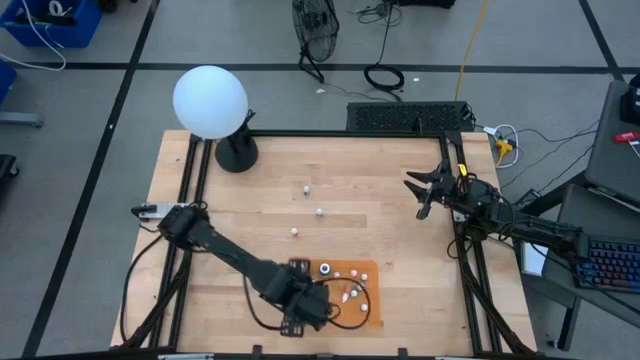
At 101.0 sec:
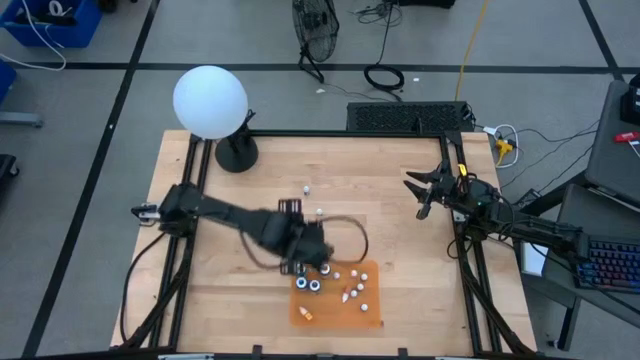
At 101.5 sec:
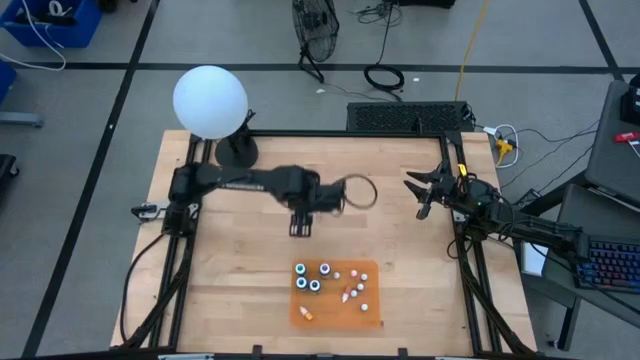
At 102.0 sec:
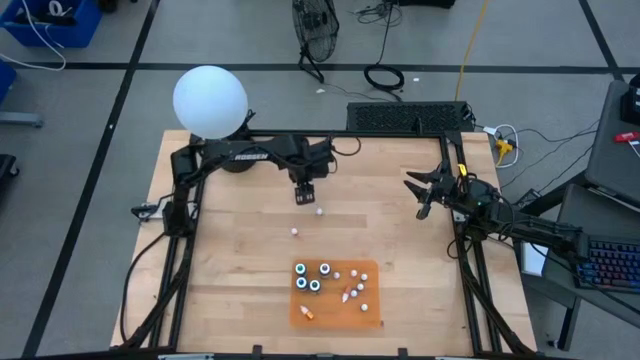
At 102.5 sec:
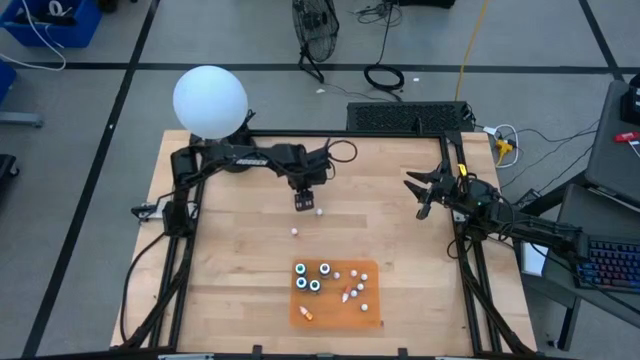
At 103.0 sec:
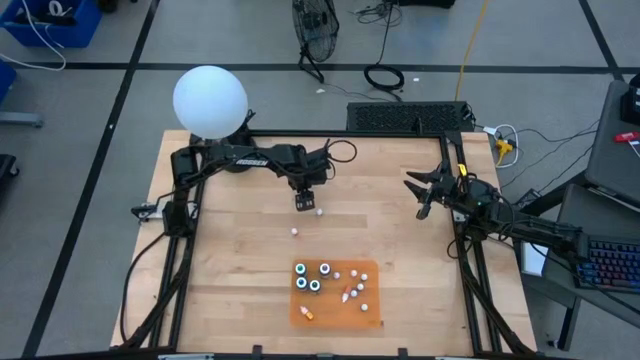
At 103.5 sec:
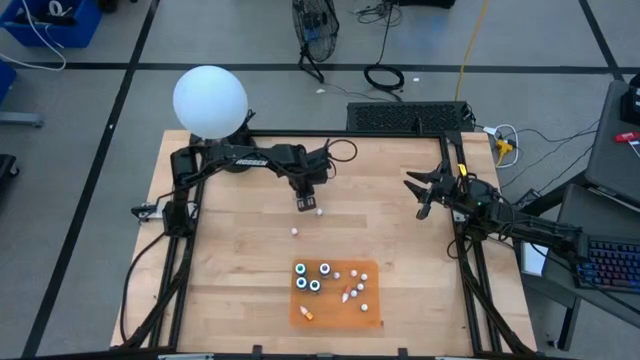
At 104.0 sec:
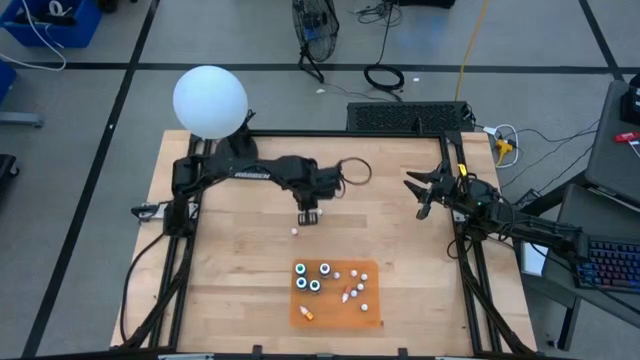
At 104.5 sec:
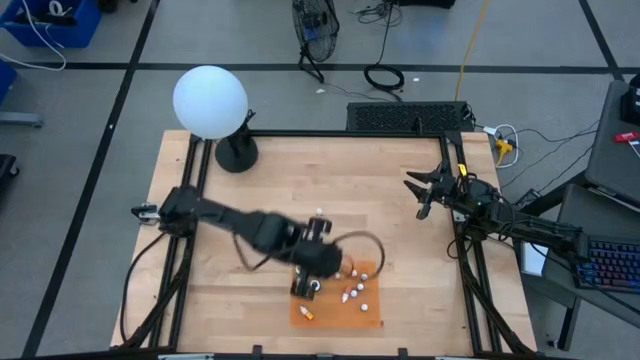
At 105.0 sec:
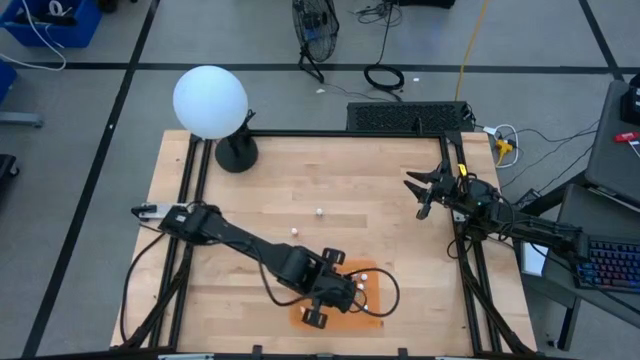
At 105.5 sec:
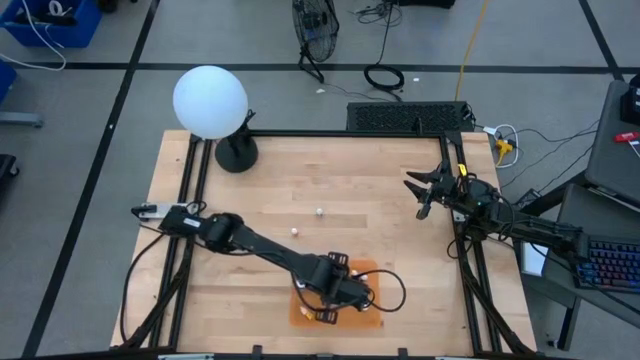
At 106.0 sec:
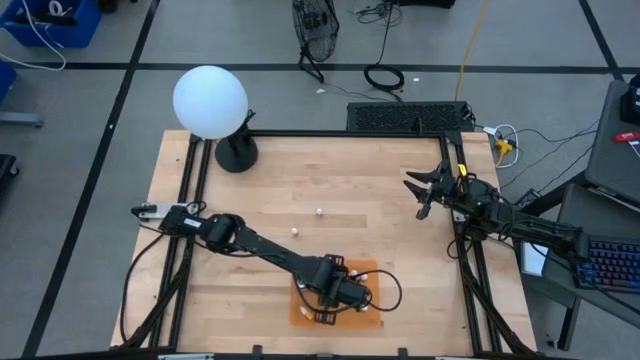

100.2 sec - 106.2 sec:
Task: Pick & Place food coloring
Put the small purple food coloring bottle into the orange container

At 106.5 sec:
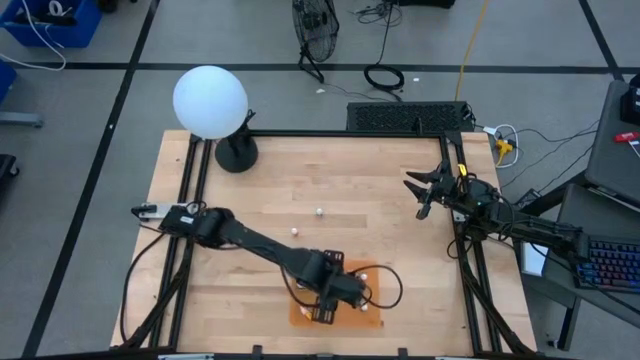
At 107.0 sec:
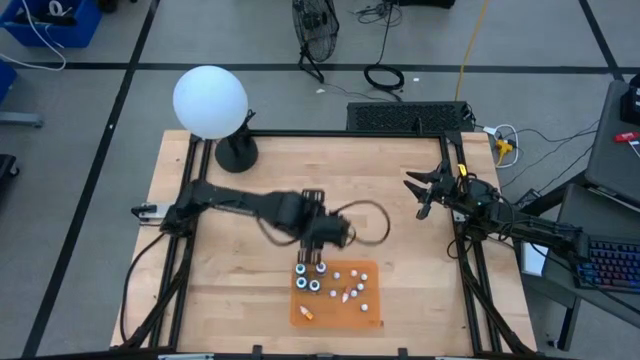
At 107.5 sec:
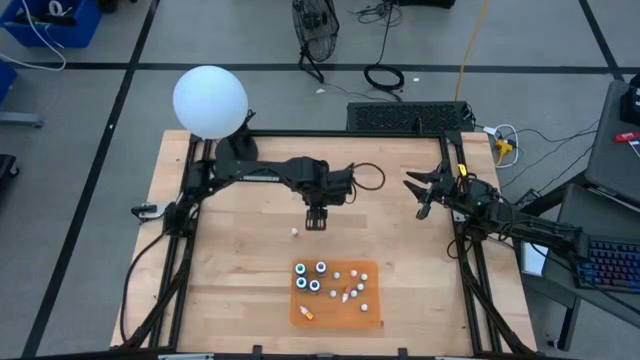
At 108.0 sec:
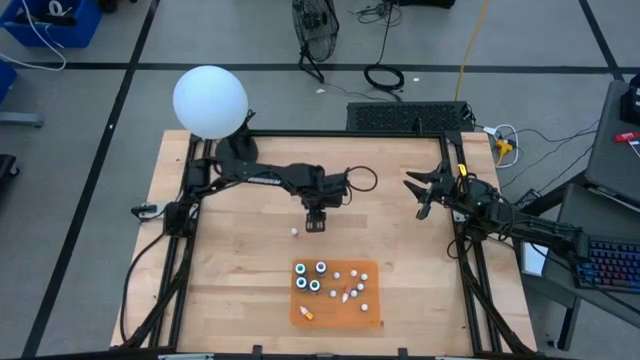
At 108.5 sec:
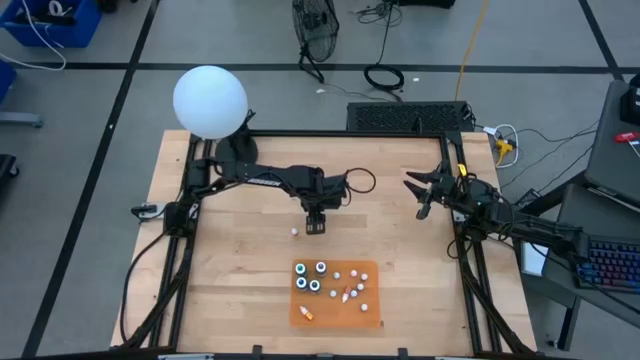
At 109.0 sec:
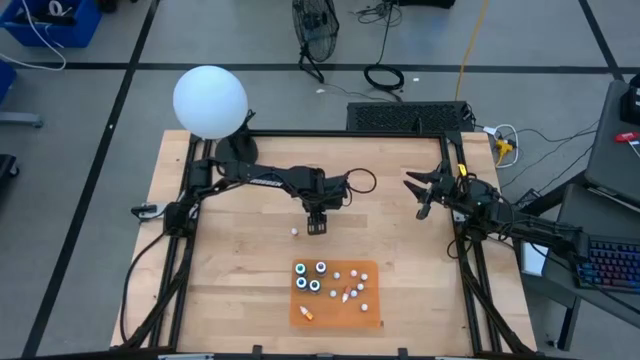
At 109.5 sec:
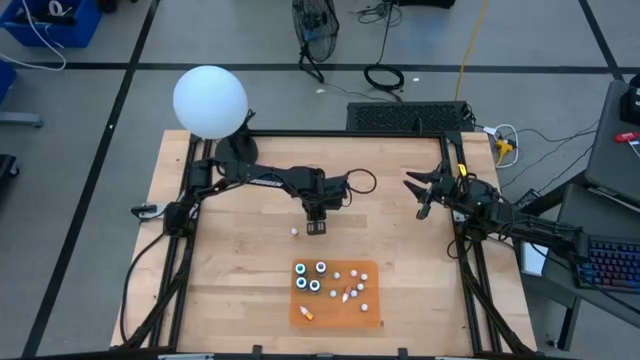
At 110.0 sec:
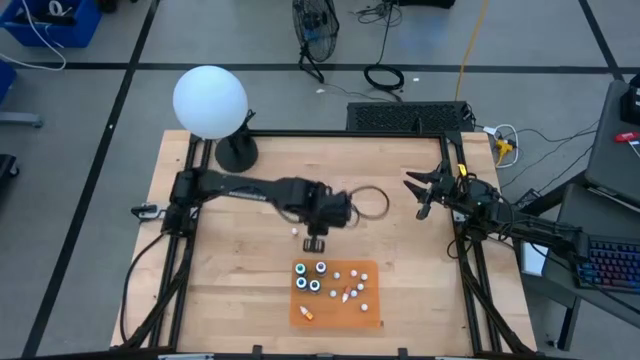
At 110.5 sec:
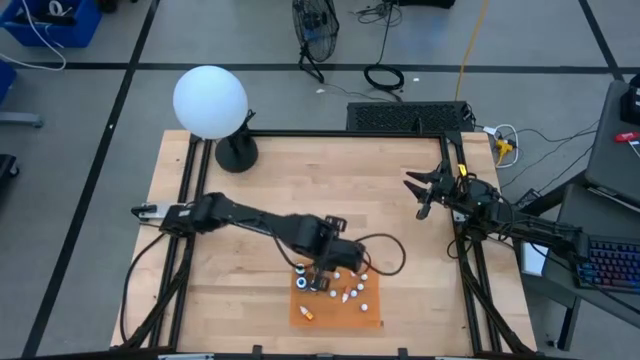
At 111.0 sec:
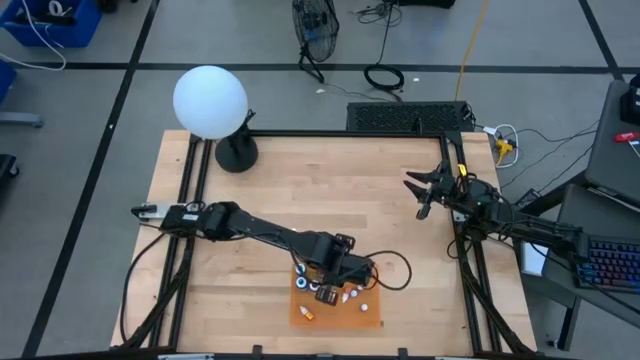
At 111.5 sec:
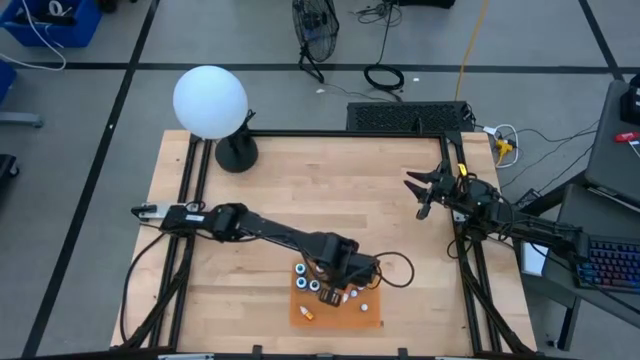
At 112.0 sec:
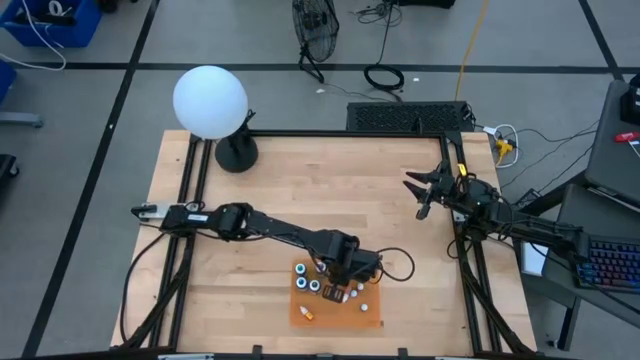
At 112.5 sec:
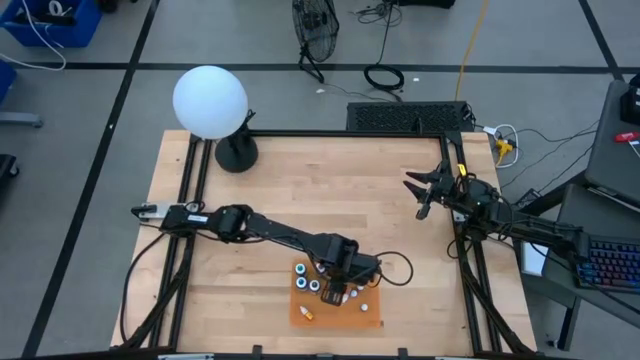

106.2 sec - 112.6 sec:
Put the small purple food coloring bottle into the orange container

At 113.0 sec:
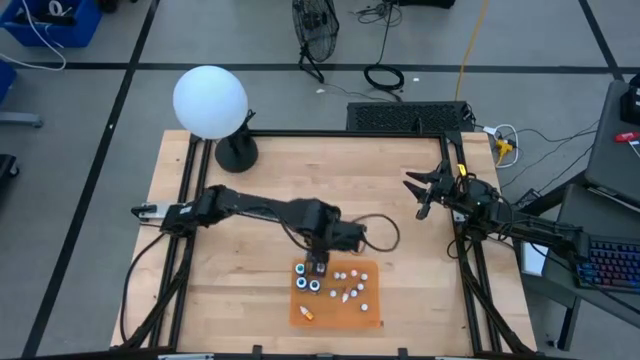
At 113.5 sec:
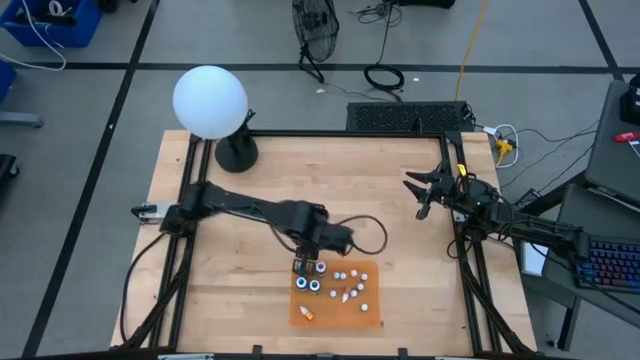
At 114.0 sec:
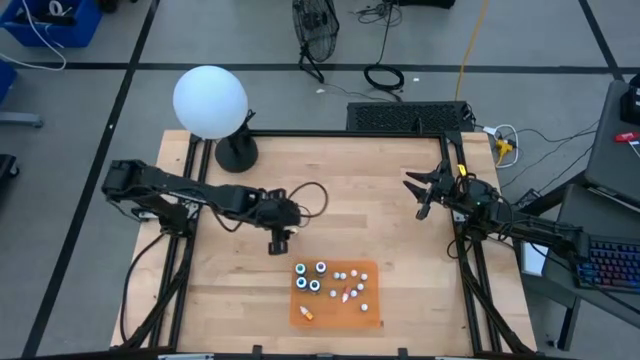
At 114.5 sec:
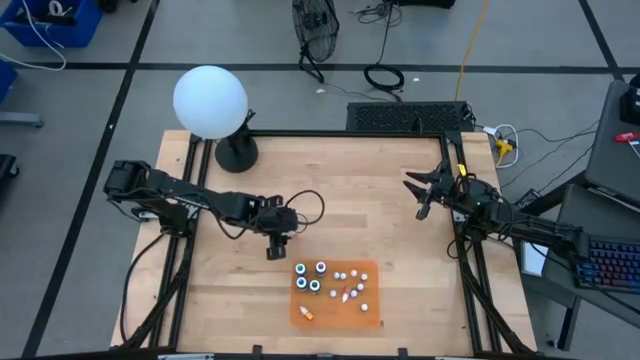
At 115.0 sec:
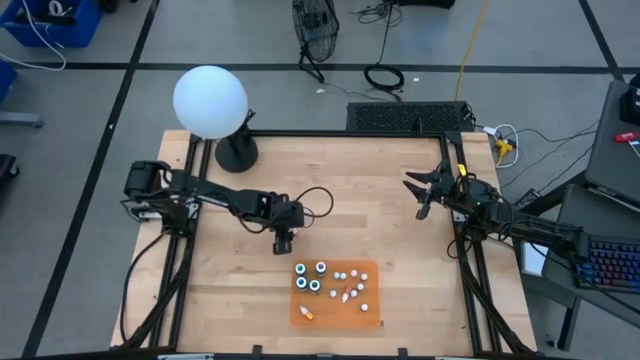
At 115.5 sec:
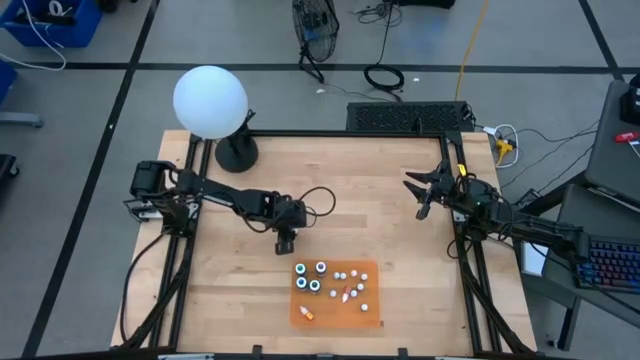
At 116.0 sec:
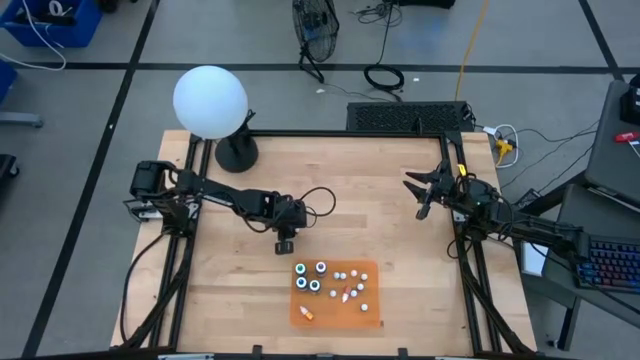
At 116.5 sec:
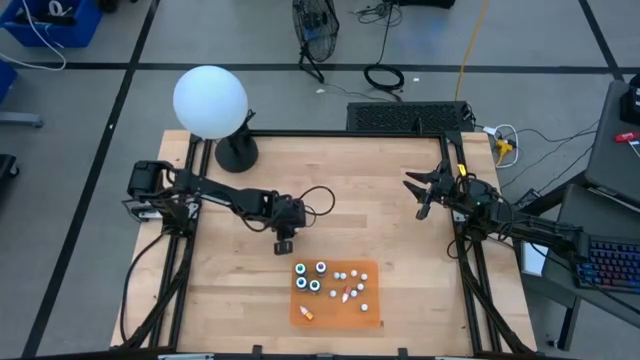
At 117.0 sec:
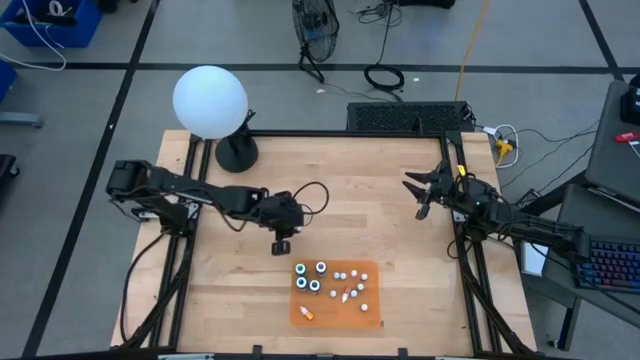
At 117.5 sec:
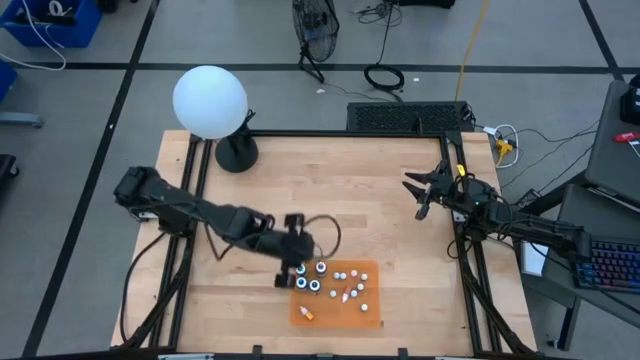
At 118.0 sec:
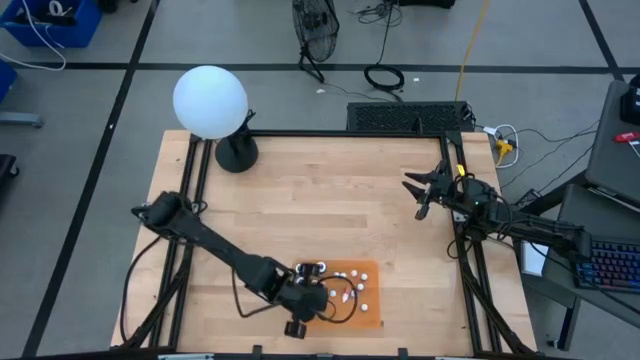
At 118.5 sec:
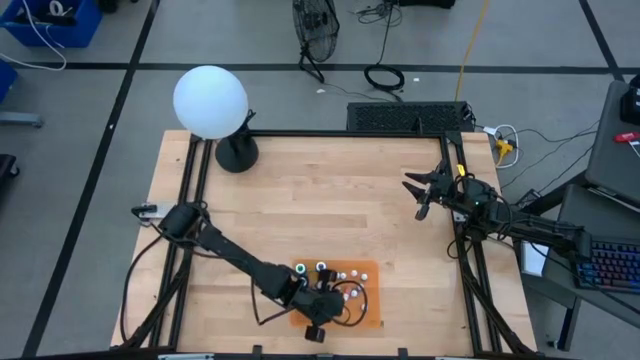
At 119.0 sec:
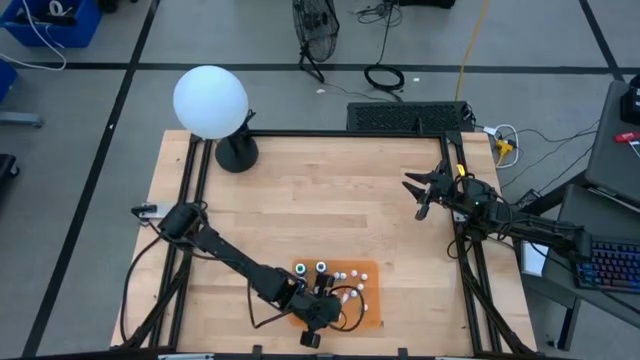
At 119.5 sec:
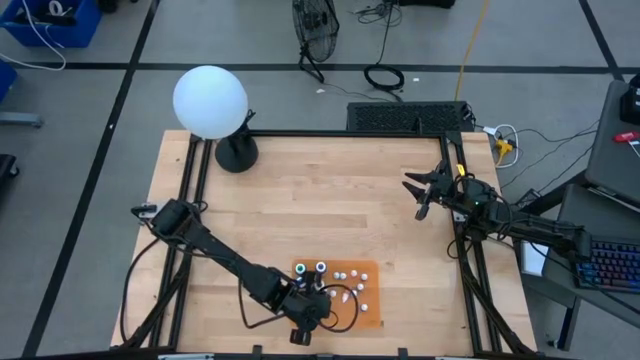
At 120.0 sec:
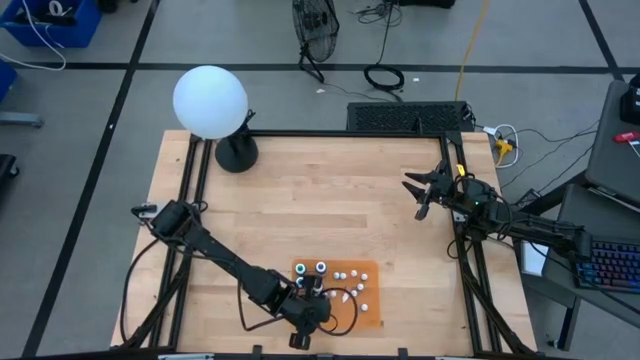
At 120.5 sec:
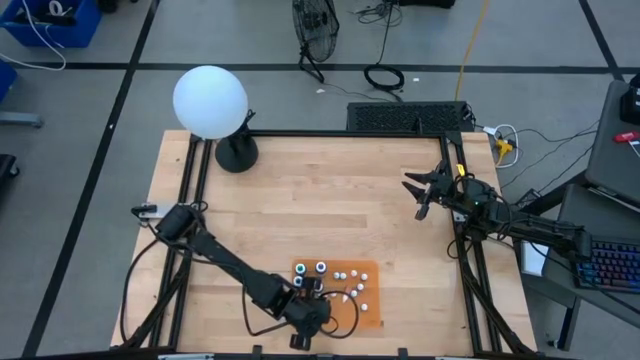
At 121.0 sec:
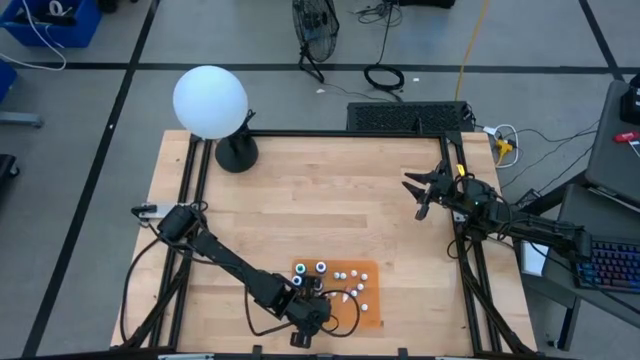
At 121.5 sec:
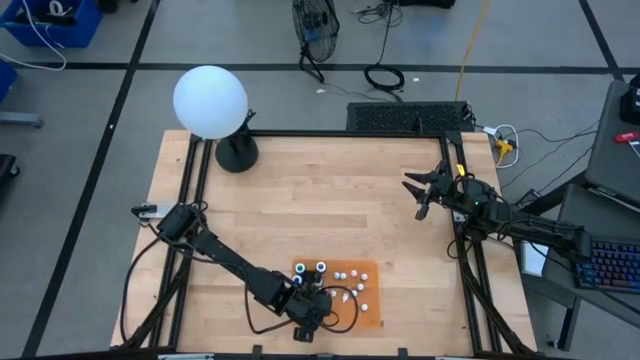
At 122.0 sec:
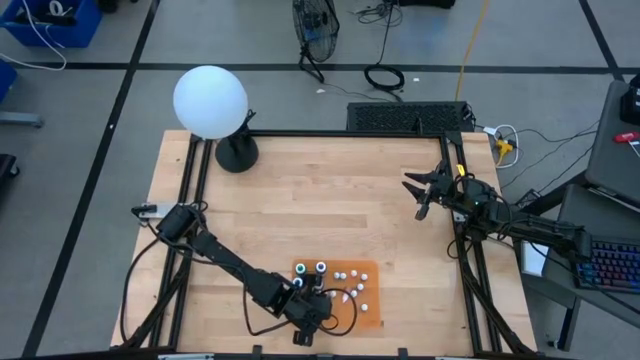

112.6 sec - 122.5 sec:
Put the small orange food coloring bottle into the orange container
